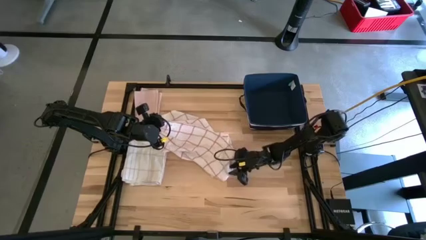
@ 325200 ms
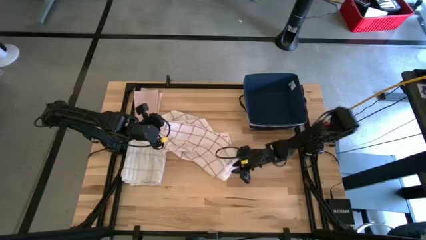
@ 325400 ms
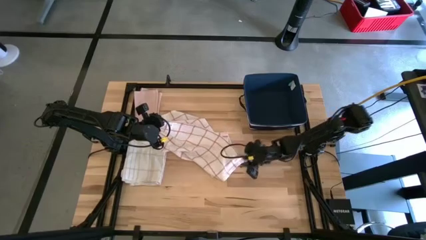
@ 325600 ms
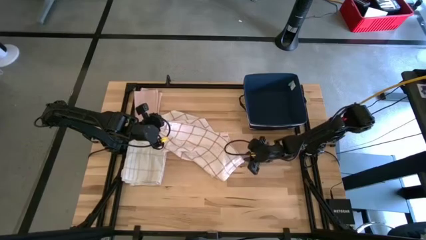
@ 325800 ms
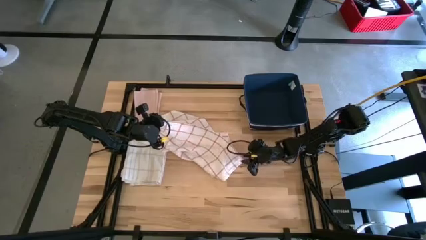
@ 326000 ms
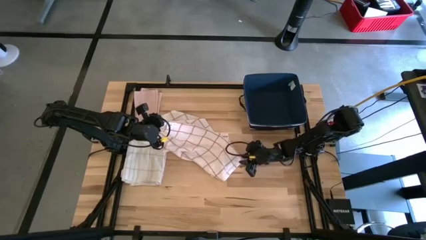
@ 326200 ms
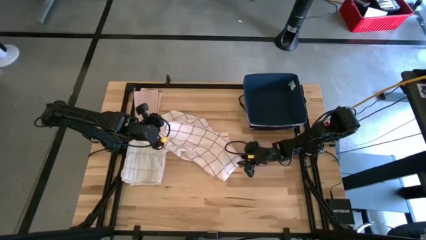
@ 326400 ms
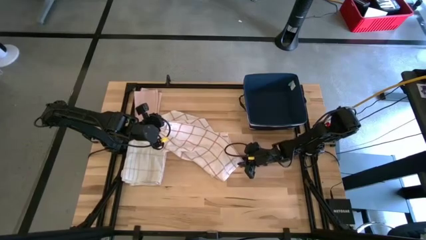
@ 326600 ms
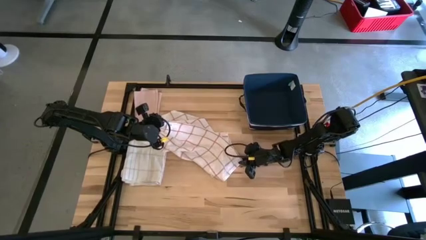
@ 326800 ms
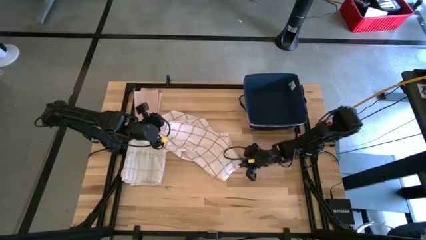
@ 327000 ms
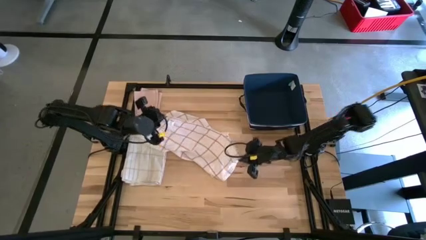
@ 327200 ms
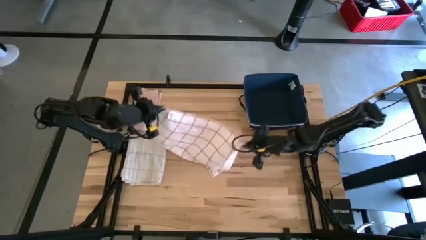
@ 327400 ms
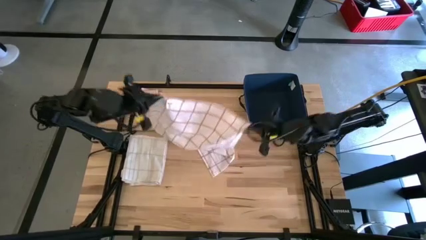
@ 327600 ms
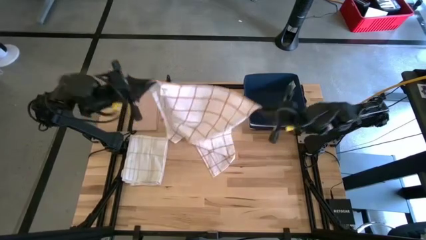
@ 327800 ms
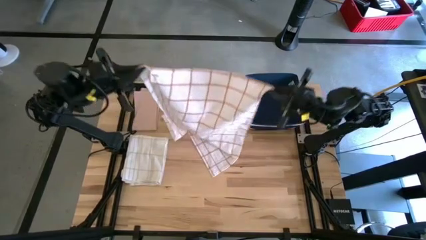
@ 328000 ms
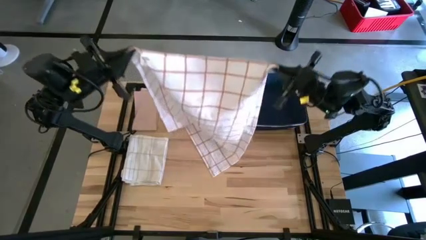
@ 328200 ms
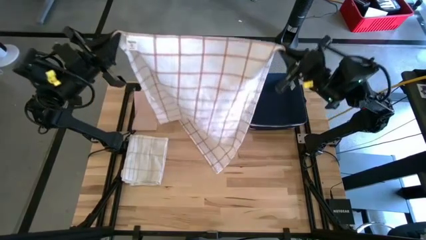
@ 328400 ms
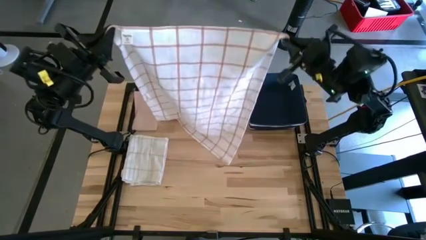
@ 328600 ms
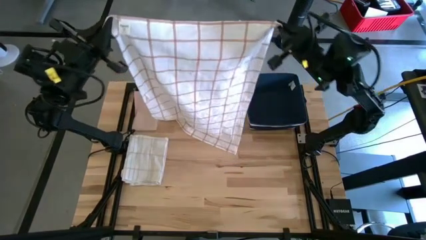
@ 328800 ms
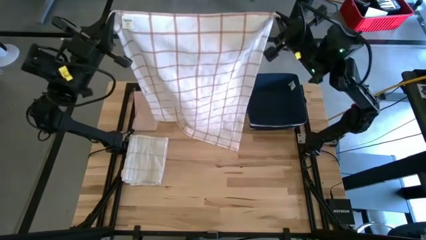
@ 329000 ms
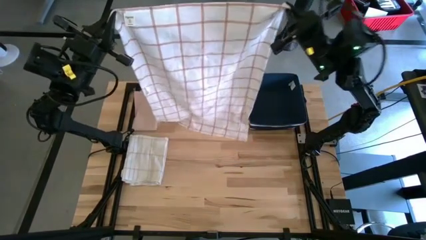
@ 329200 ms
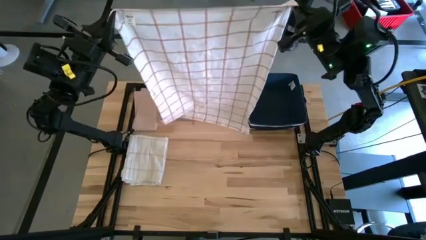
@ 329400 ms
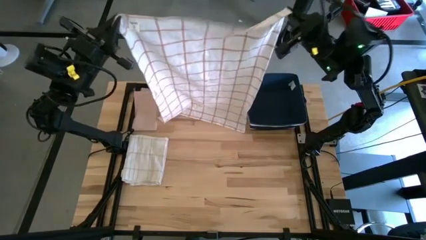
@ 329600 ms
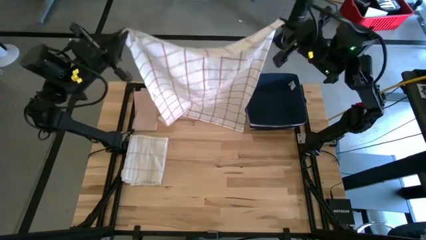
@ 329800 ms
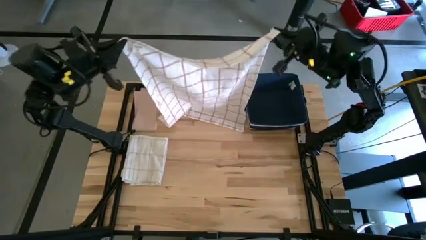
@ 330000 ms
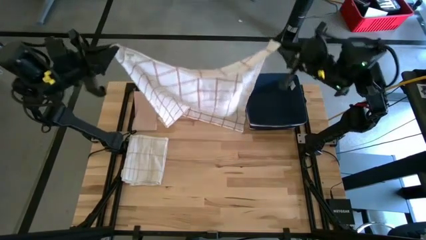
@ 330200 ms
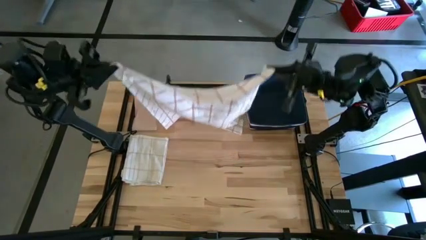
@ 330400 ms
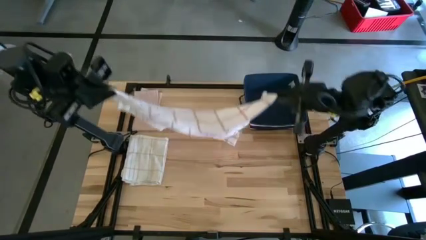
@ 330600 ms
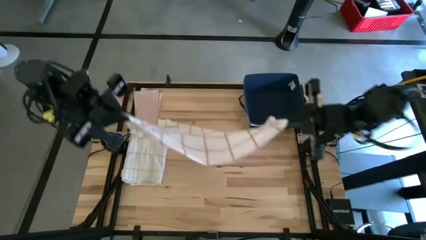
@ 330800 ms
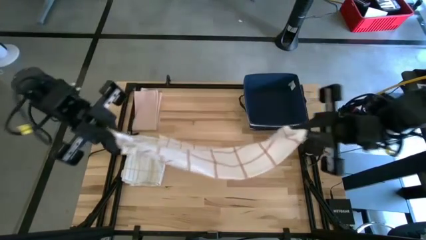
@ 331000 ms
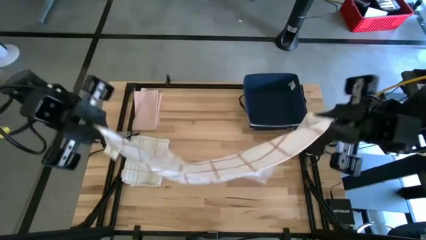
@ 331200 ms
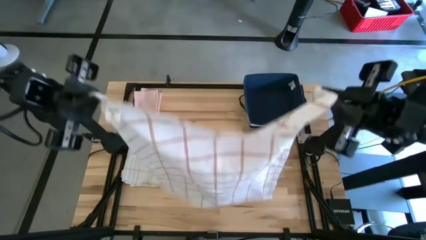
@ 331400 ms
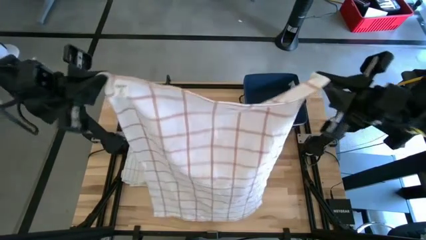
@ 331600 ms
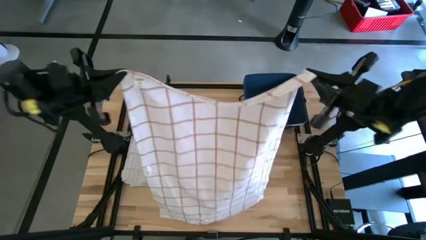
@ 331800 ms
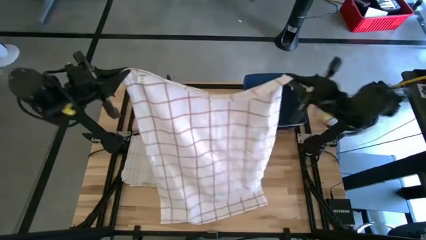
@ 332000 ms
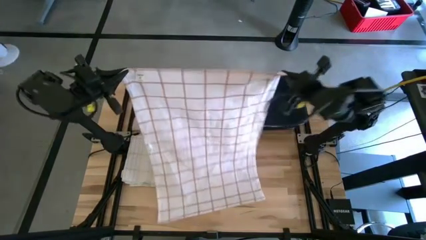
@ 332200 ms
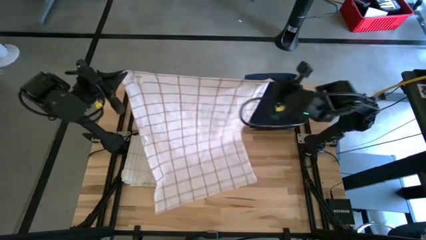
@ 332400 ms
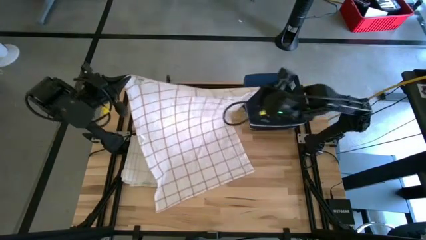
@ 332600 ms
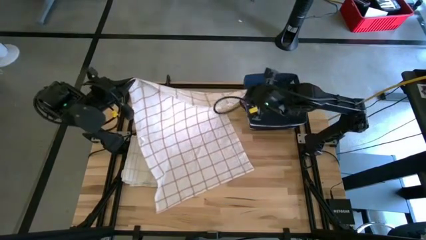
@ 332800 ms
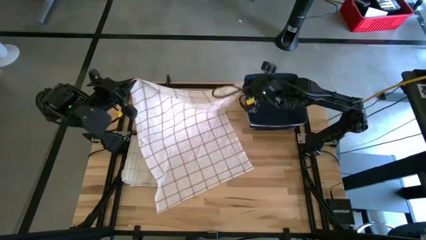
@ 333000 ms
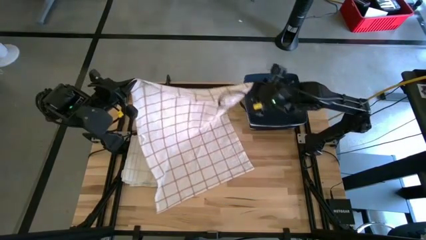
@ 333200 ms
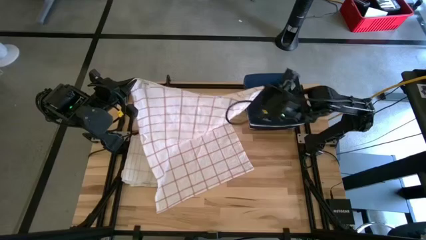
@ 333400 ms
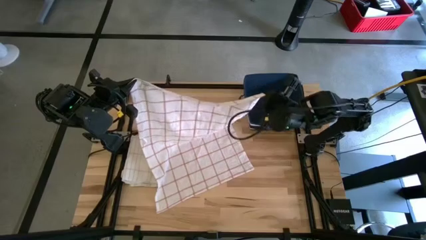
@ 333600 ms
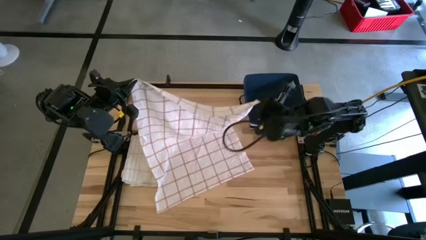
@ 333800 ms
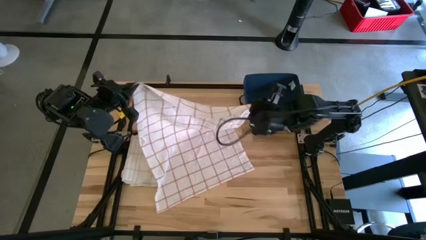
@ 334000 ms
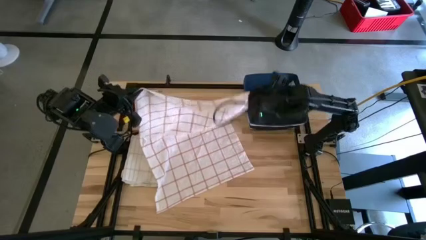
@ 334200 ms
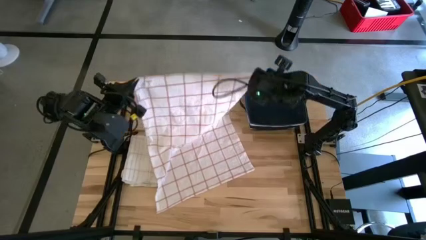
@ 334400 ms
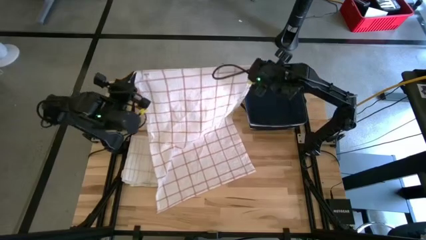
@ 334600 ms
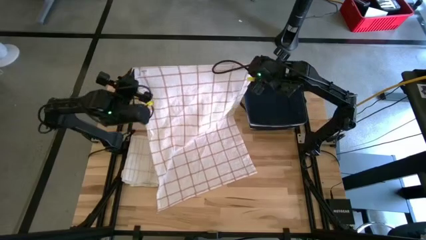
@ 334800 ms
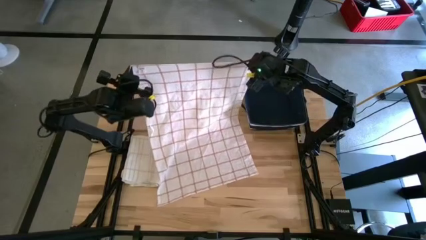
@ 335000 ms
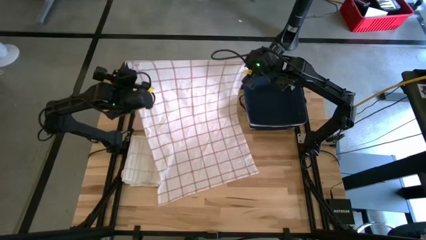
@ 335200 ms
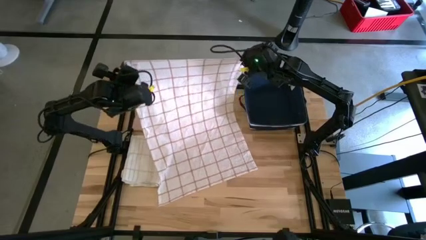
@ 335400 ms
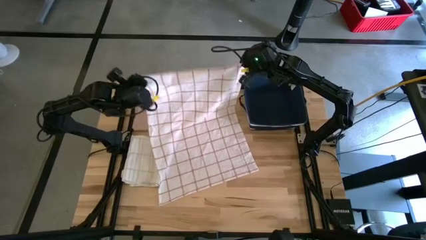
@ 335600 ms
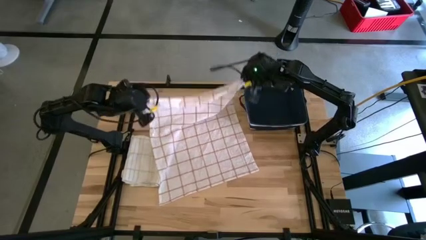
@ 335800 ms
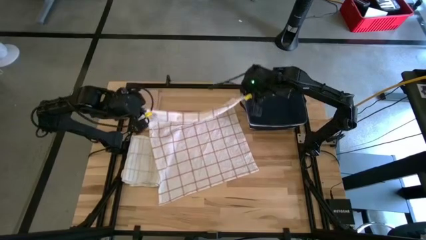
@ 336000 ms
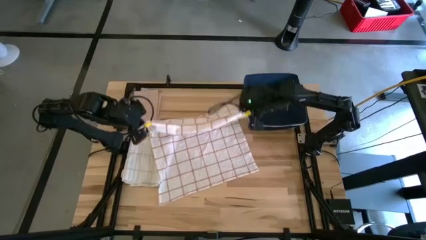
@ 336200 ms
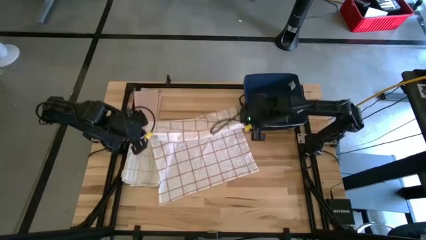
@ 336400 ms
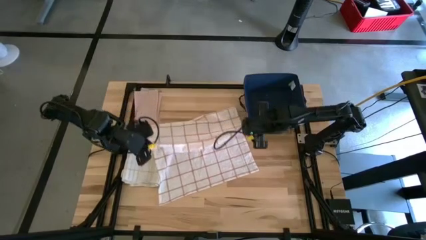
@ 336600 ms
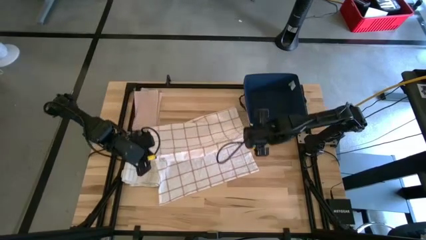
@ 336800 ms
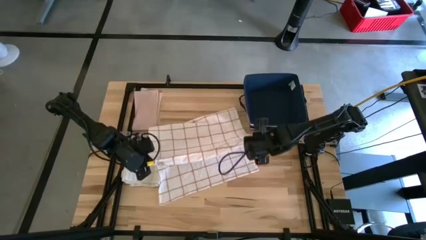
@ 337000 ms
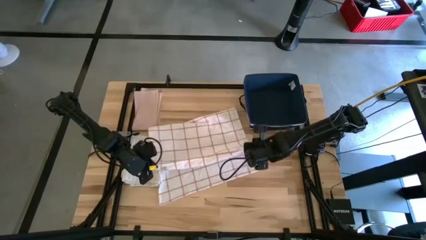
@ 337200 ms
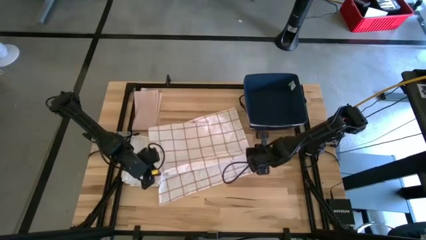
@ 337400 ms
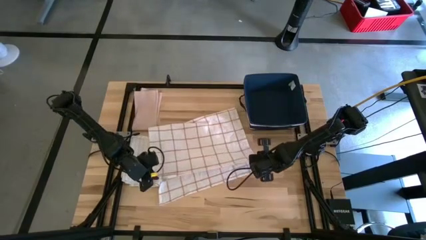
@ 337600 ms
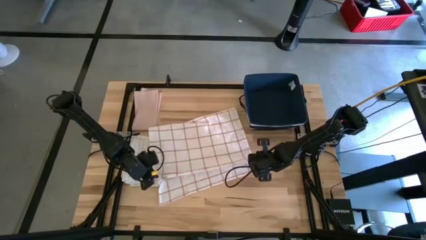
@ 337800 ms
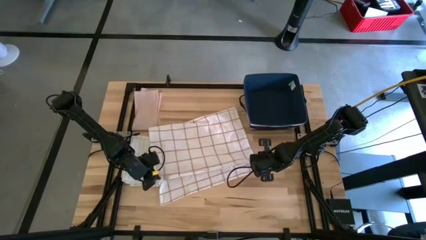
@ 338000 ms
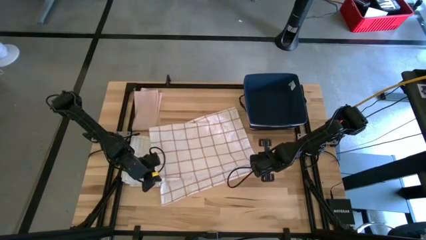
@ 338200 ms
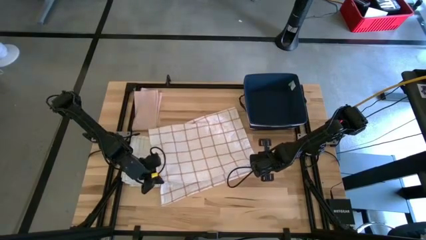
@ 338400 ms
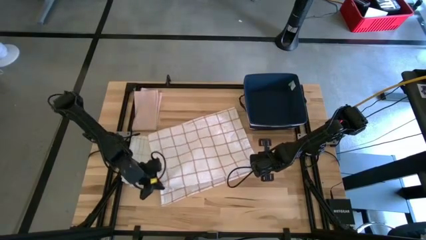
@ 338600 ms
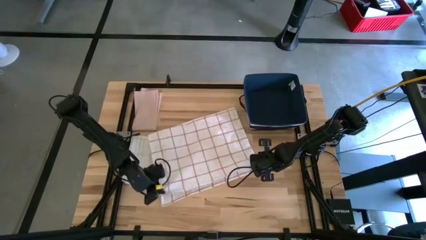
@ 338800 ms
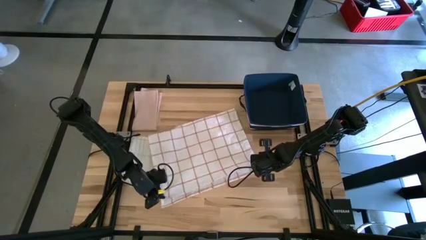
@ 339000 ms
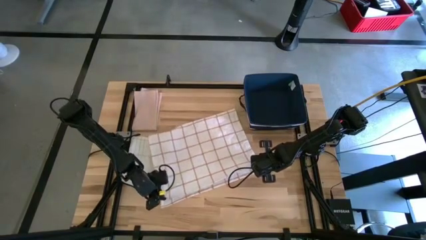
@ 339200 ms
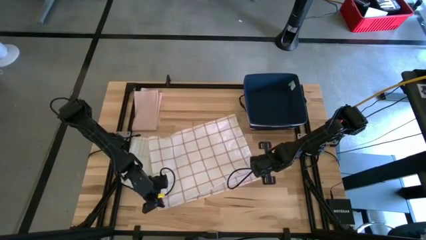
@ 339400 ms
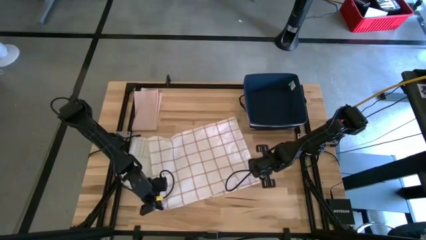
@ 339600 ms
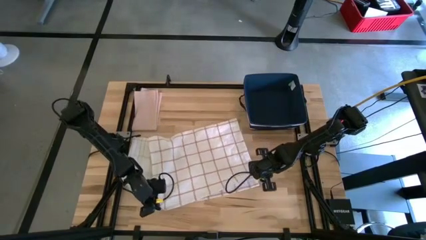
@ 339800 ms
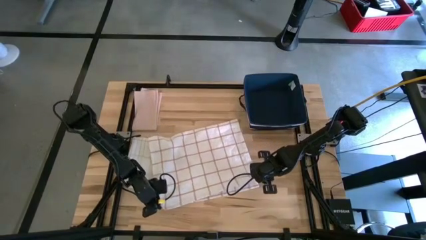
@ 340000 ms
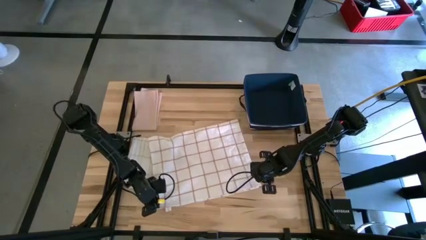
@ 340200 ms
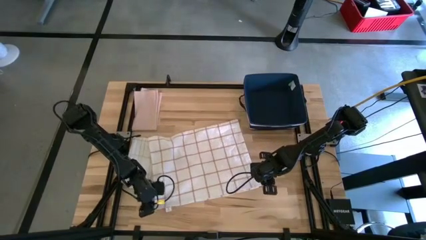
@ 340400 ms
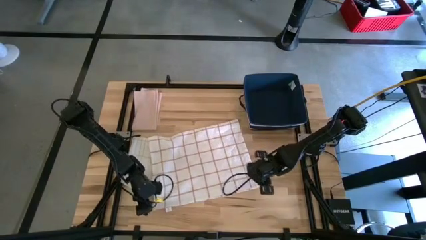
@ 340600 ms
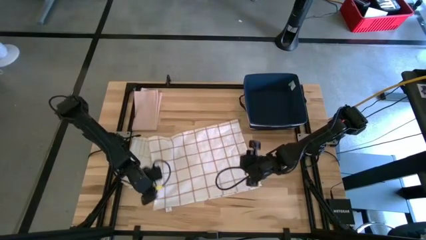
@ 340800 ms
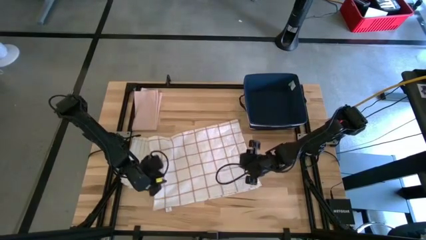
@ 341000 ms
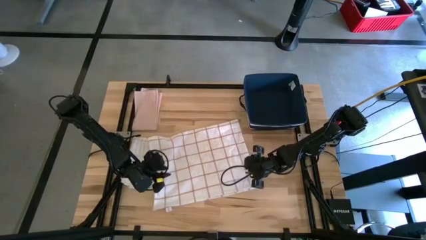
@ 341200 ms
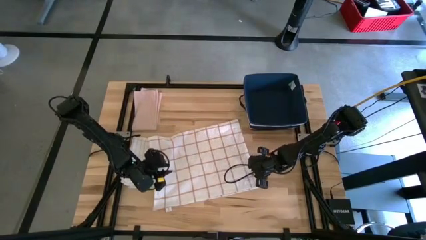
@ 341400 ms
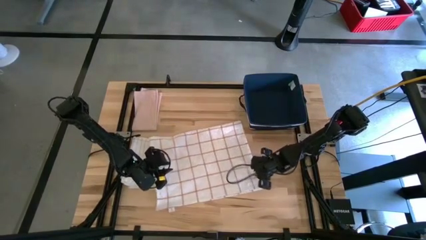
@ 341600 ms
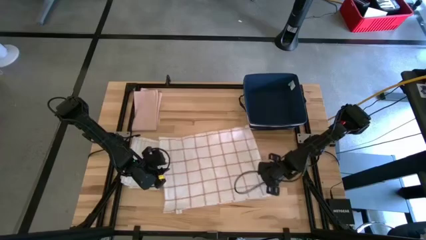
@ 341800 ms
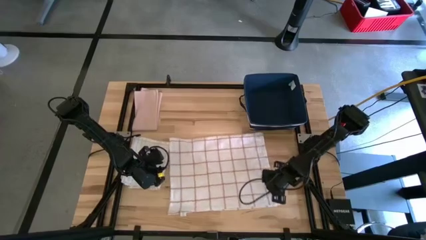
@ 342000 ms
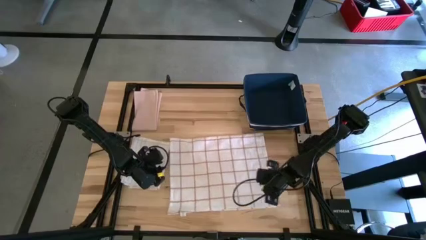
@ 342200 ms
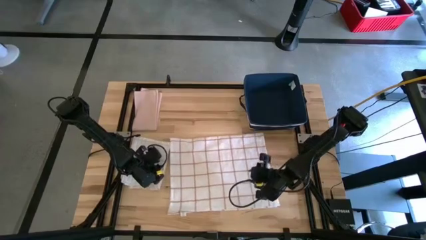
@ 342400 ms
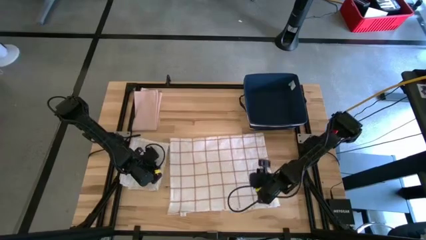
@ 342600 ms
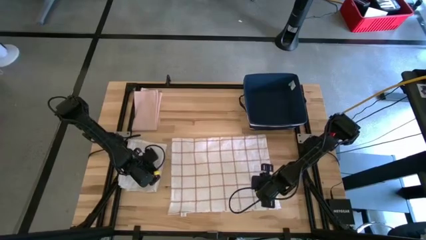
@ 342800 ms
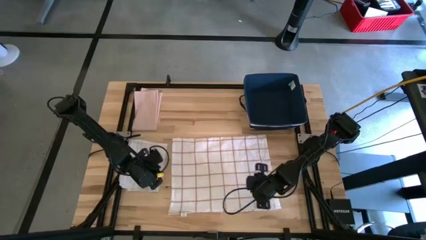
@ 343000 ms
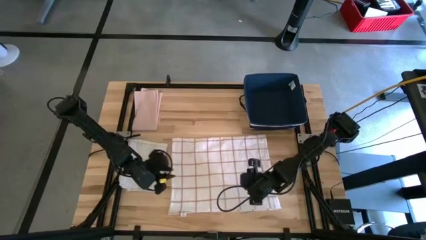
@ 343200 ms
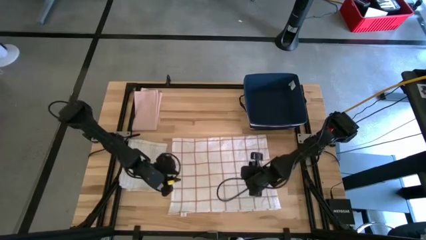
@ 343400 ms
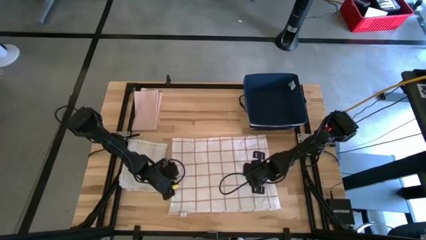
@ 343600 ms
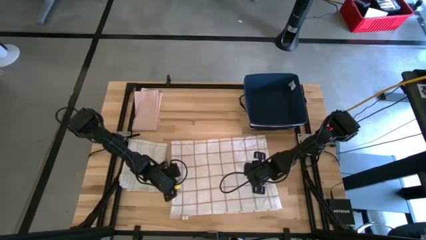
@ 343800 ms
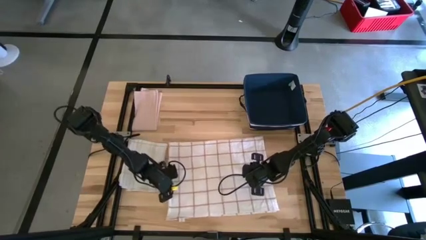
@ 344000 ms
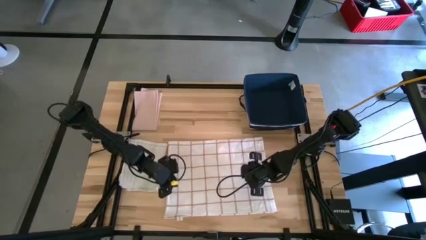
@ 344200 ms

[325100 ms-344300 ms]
Task: Fold towel
Fold the white squared towel
